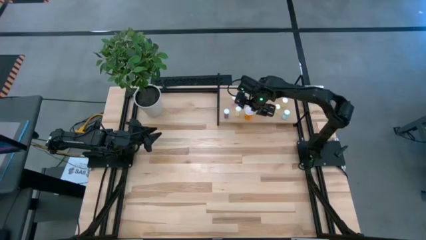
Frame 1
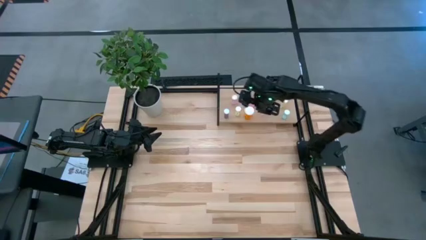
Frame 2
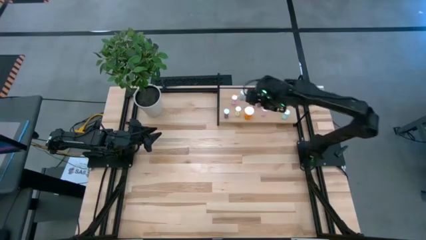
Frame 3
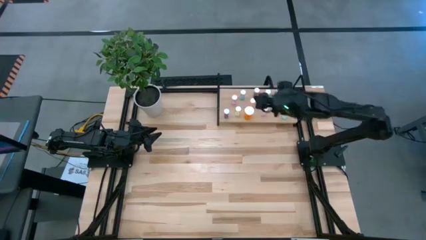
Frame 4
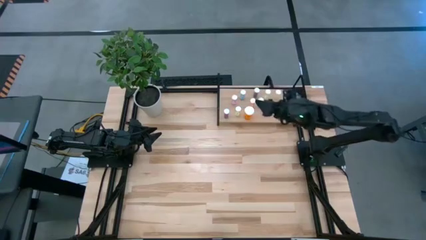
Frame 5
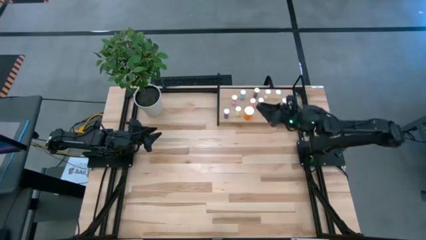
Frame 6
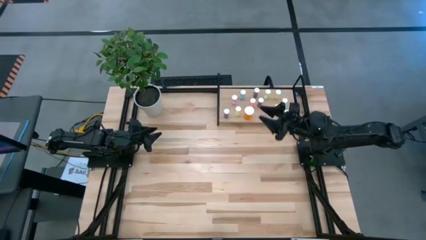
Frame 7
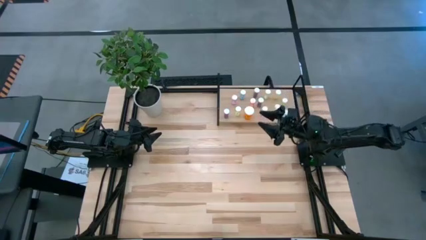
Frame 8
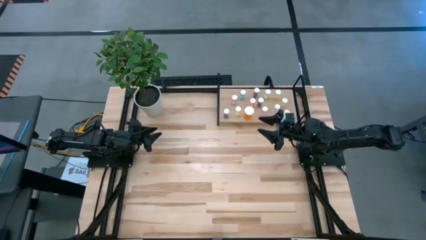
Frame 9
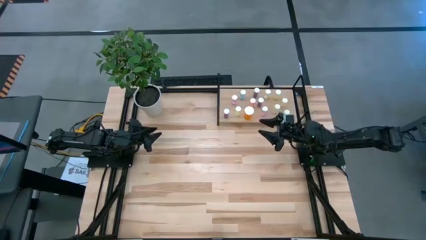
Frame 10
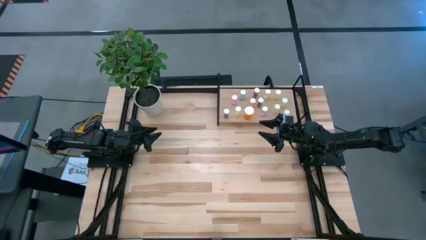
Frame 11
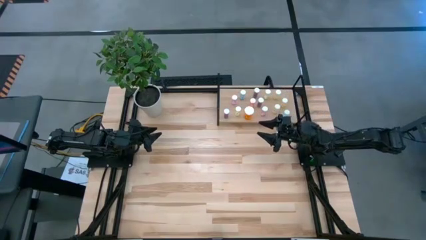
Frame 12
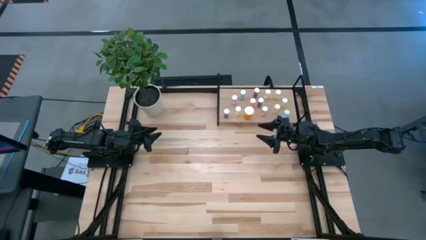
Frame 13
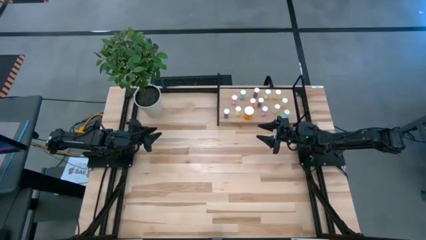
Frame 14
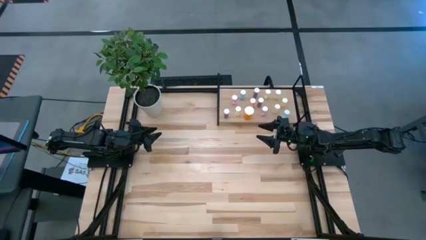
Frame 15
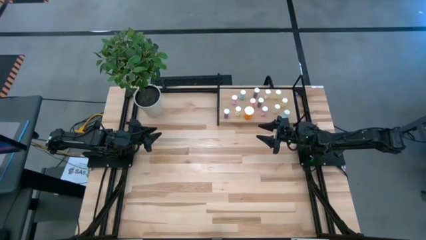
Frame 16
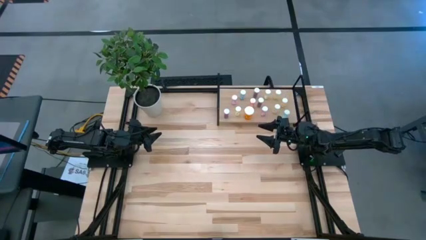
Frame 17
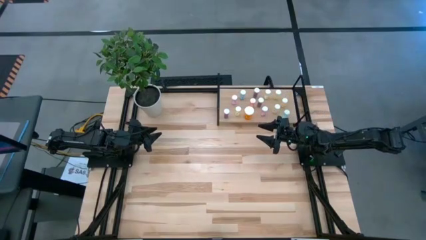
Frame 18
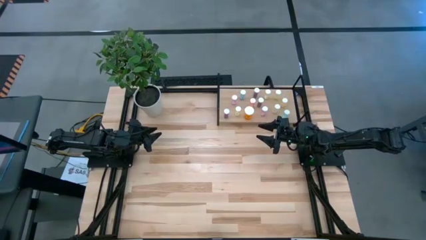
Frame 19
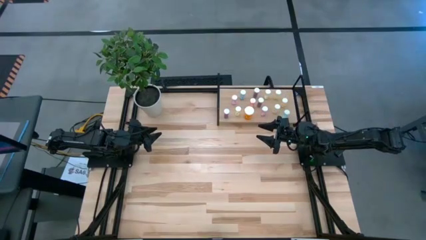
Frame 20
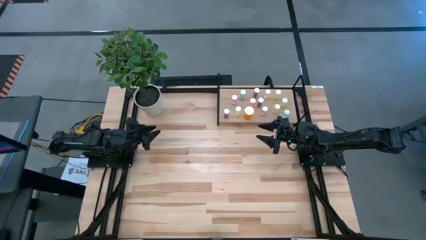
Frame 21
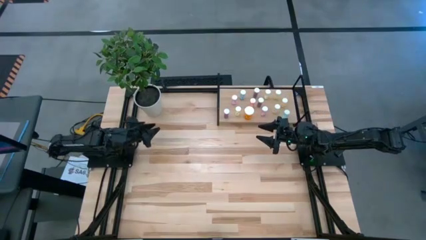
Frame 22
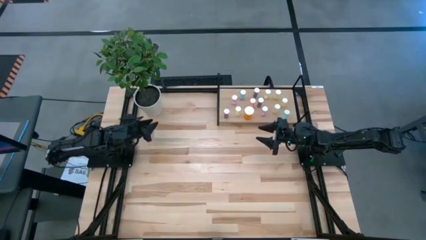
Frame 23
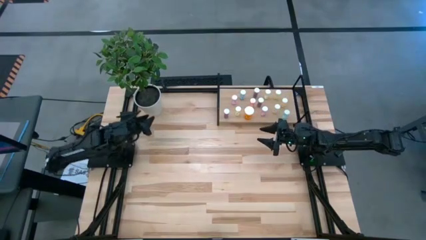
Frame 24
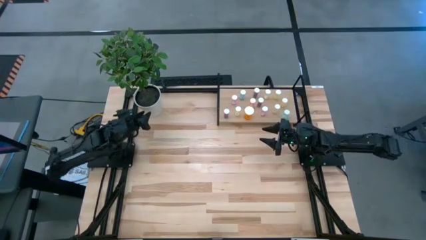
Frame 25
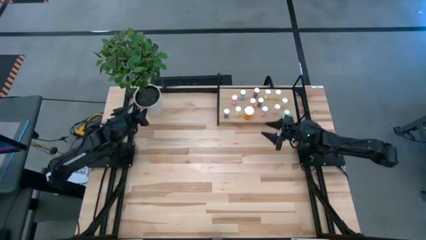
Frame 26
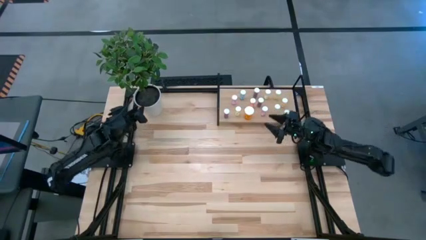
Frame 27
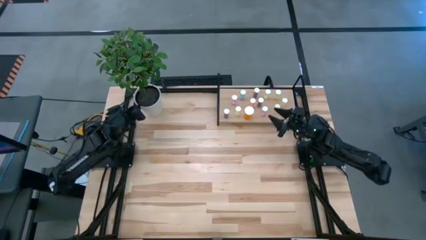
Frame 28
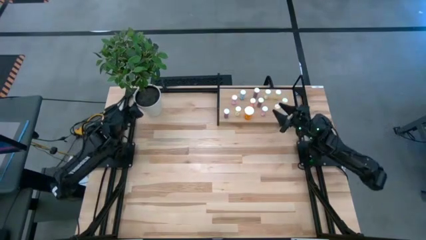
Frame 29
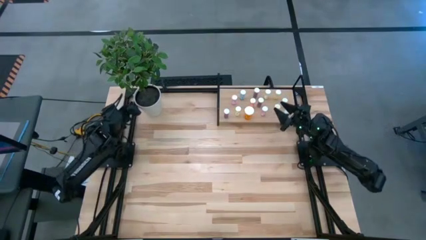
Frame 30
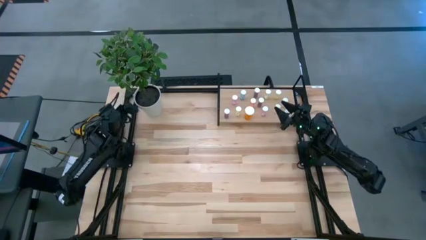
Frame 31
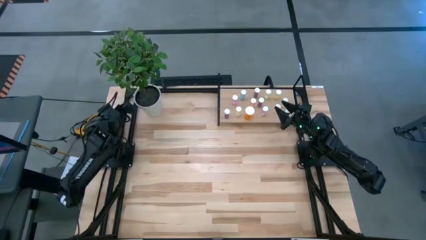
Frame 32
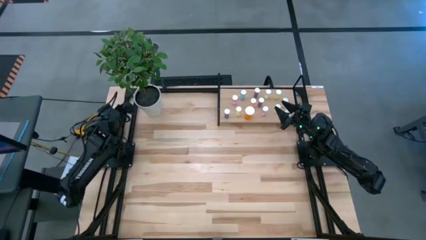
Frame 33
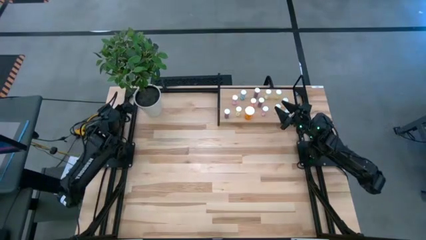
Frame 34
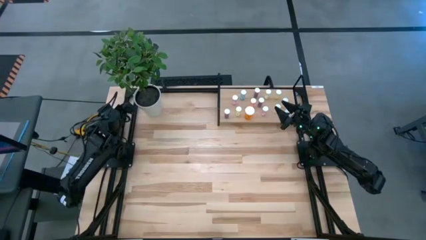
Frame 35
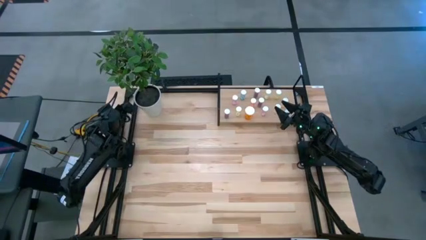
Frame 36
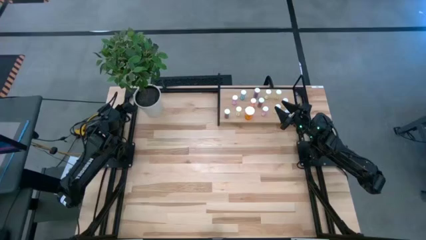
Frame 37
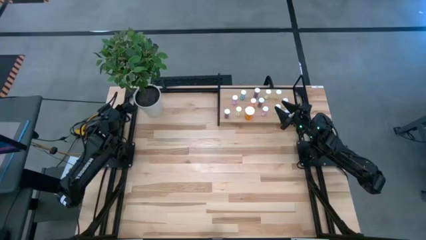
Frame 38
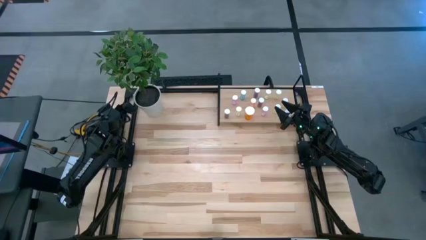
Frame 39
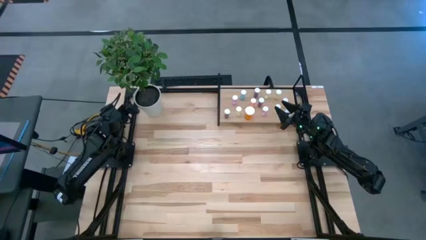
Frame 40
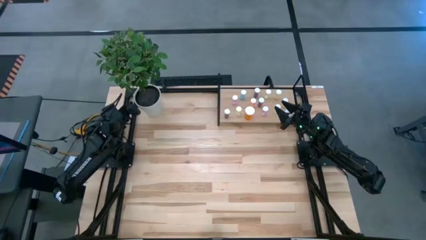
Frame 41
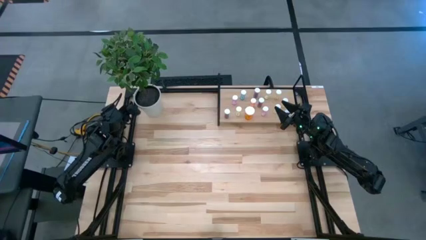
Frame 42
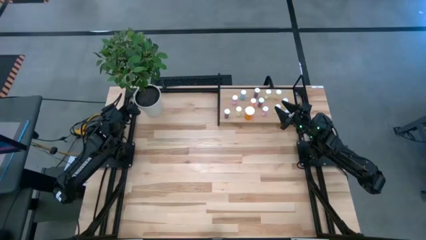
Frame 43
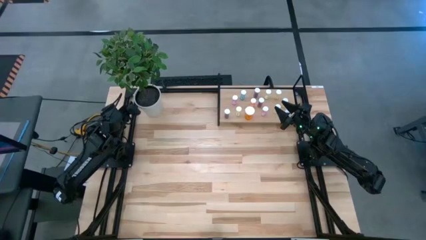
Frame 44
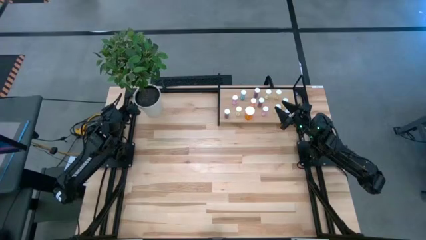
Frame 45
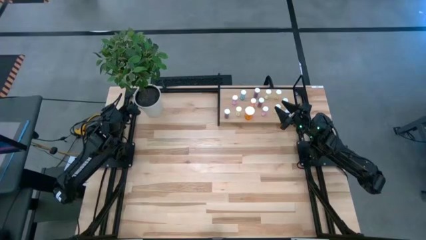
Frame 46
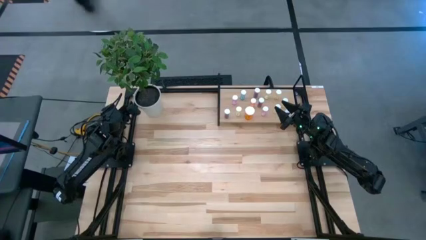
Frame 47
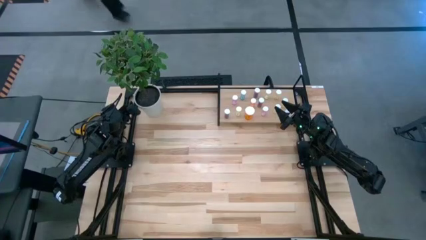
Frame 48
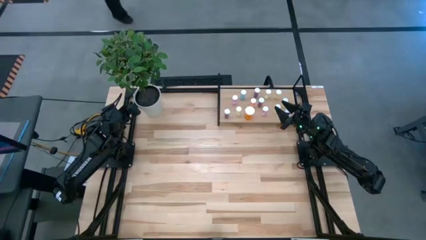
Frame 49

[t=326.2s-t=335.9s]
Task: Pick and place medicine bottles onto shelf by color
Return to Home Position

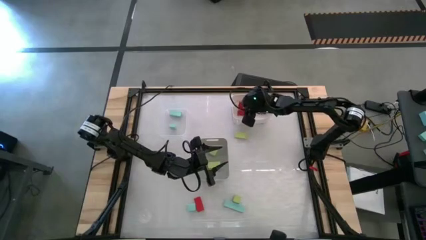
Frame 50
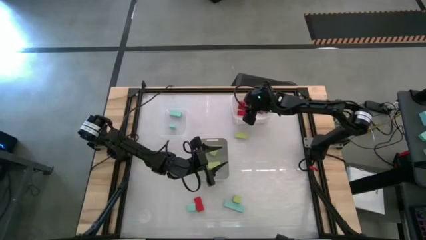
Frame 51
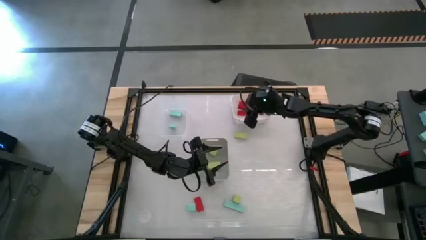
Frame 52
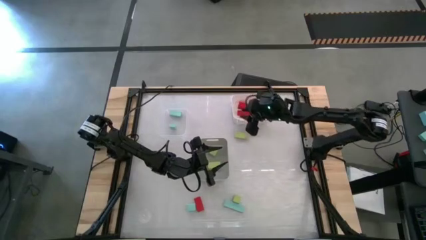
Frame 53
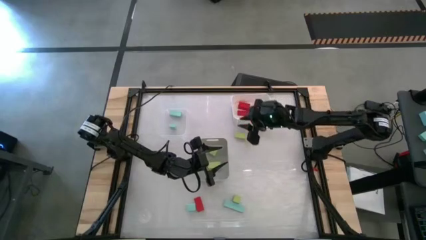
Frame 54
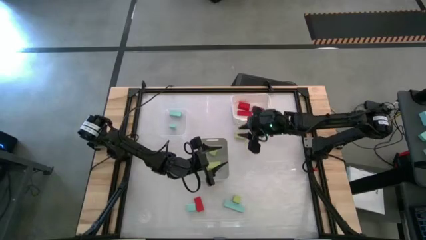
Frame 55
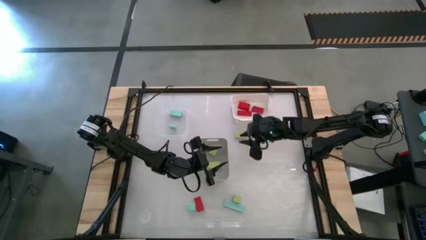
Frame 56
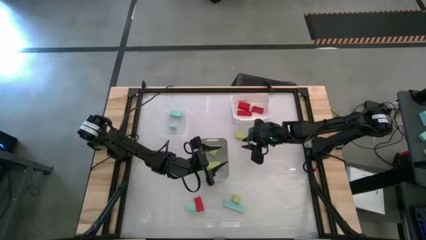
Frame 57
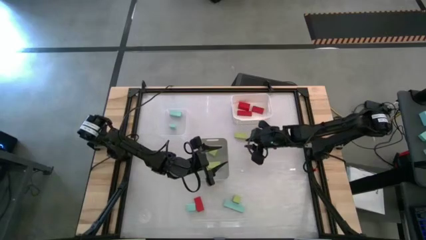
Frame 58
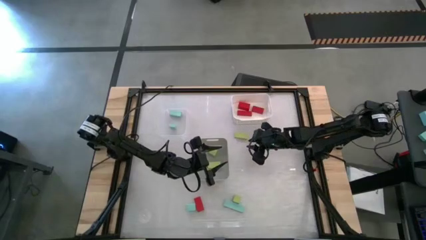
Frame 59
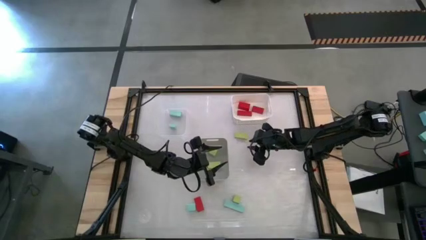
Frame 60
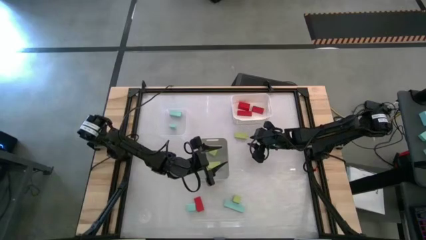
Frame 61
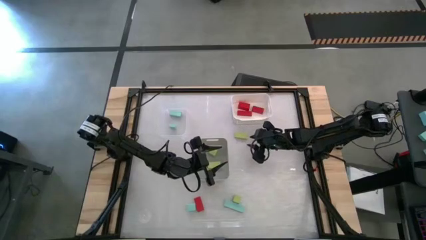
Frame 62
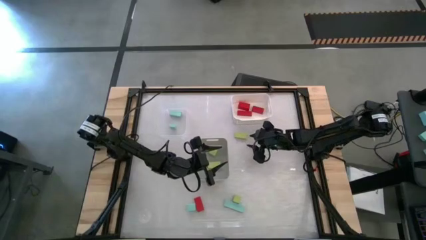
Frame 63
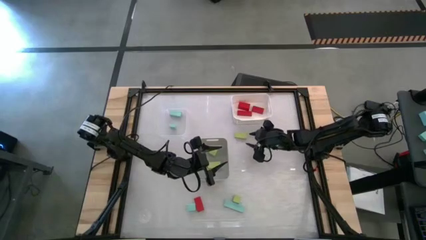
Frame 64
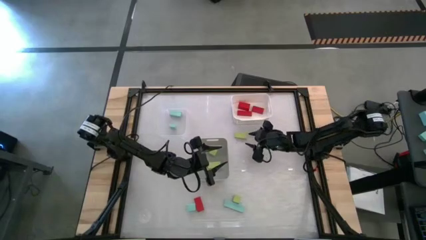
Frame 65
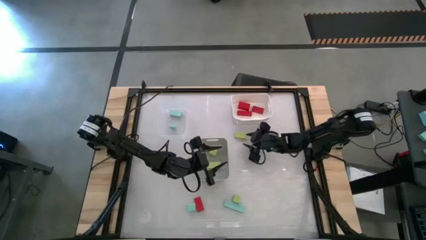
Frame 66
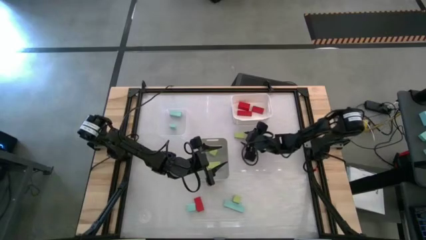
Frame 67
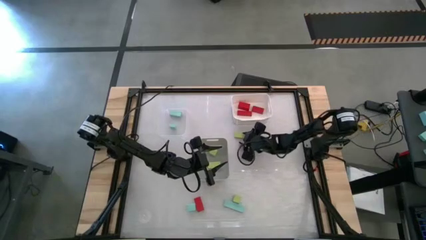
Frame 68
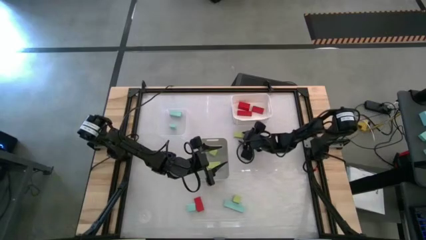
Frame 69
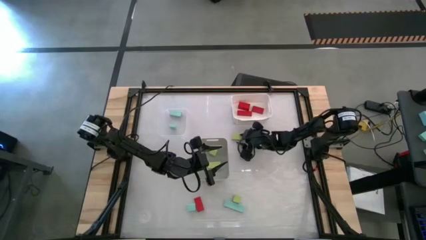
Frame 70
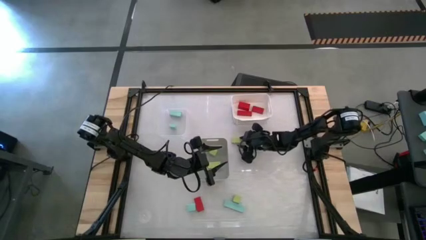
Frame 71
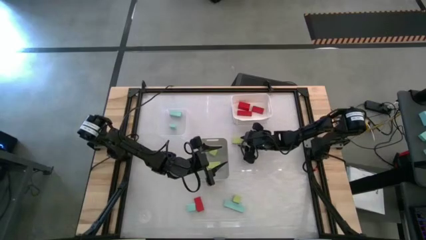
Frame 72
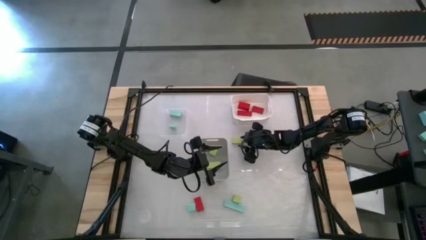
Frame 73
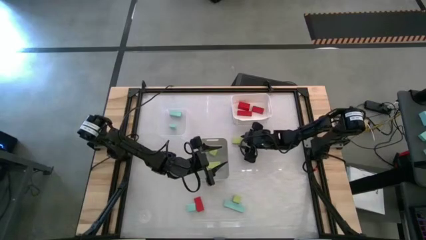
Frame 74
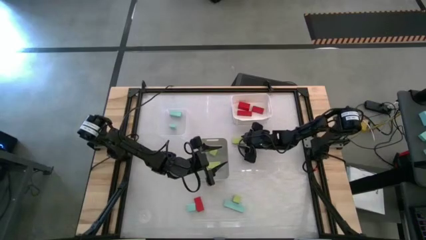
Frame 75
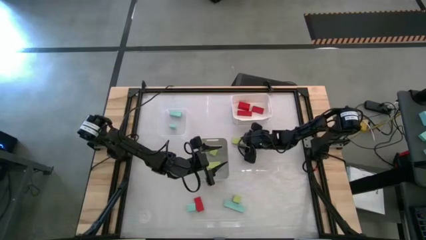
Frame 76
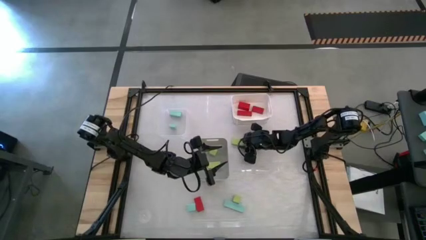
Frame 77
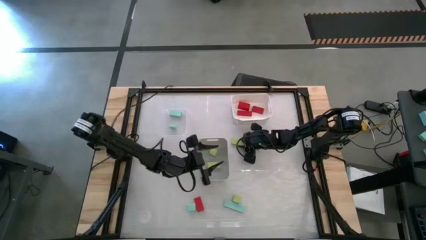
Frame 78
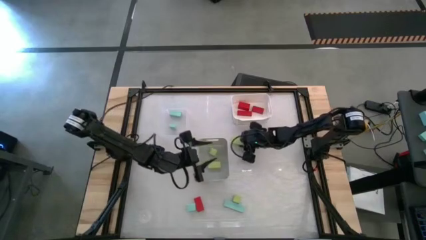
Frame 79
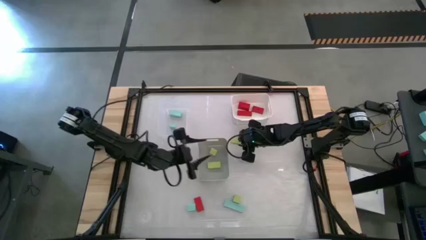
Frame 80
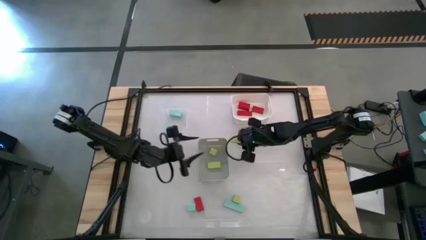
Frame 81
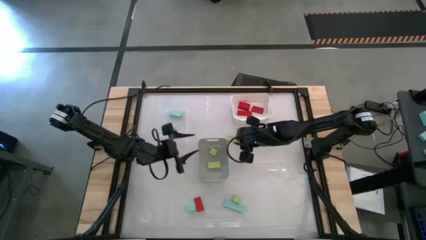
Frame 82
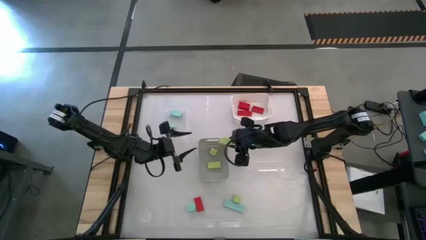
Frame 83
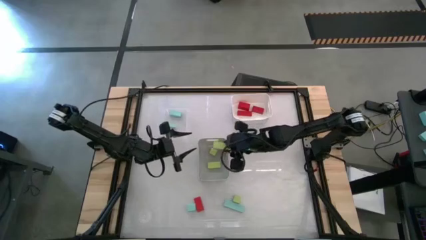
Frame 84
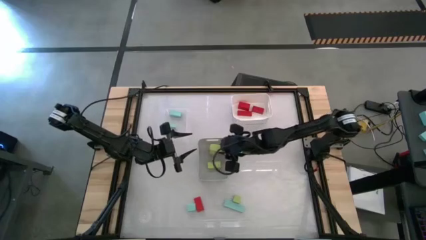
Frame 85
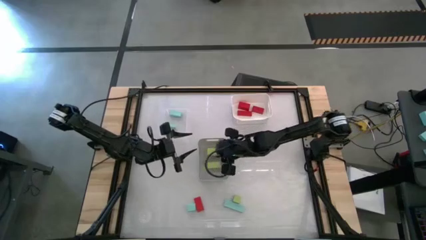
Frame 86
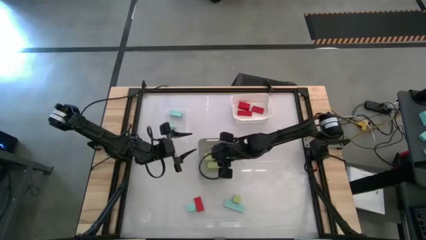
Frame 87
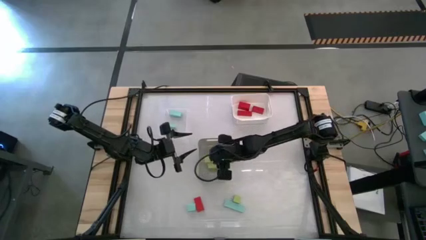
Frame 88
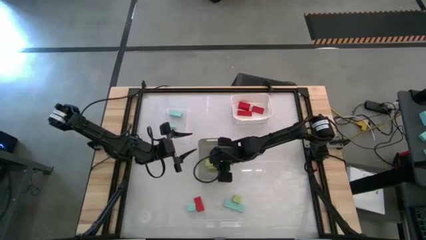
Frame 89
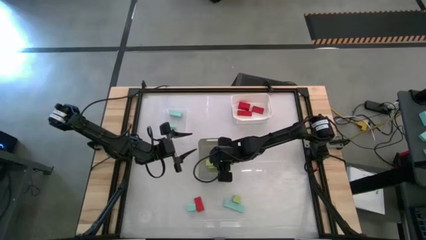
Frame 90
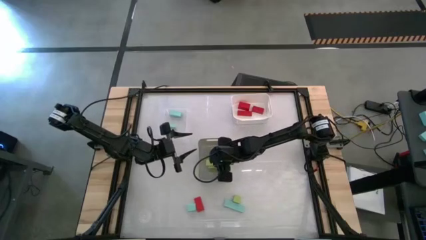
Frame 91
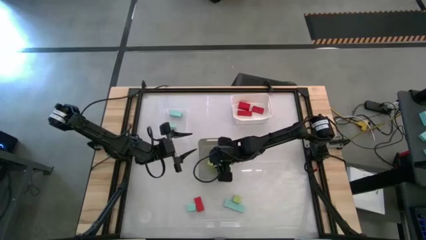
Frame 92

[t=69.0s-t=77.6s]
Task: Sort & place blocks by color
Put the green block into the gray bin
